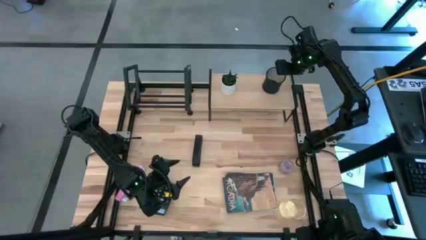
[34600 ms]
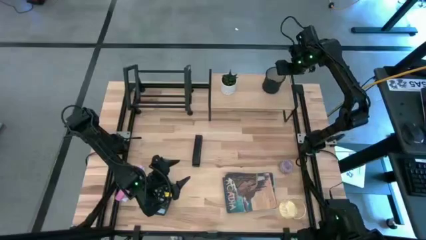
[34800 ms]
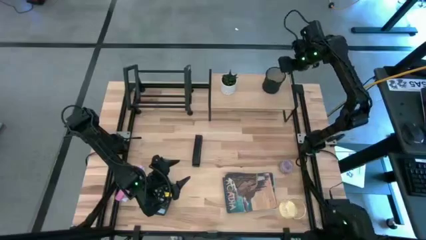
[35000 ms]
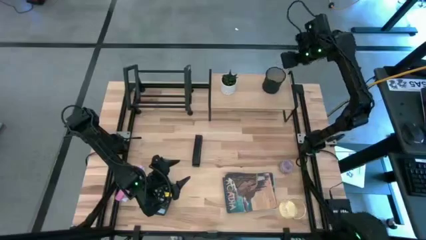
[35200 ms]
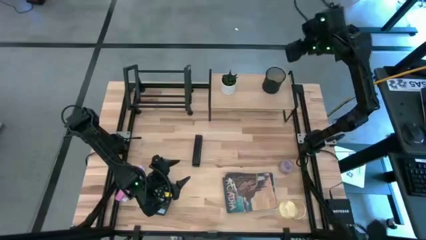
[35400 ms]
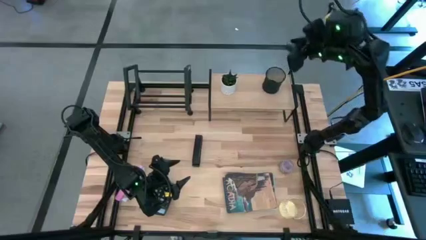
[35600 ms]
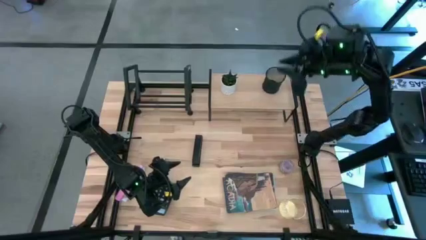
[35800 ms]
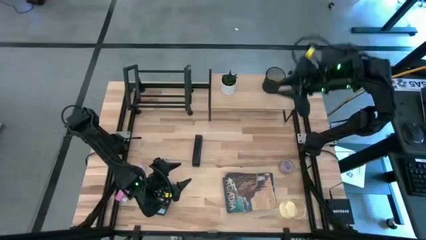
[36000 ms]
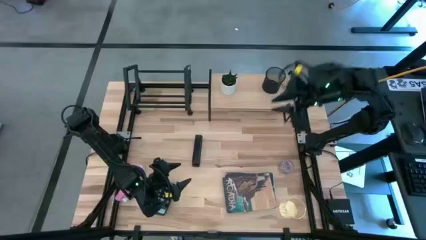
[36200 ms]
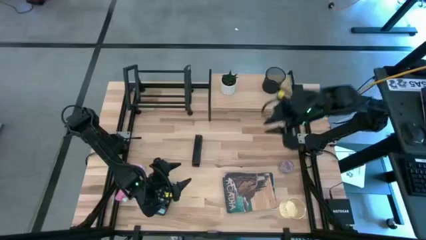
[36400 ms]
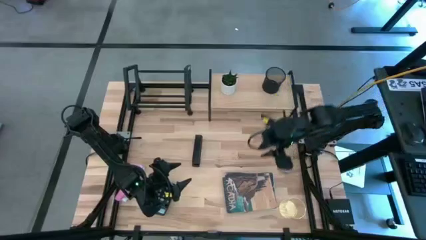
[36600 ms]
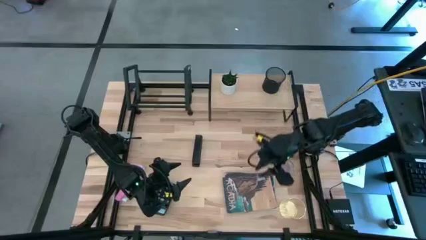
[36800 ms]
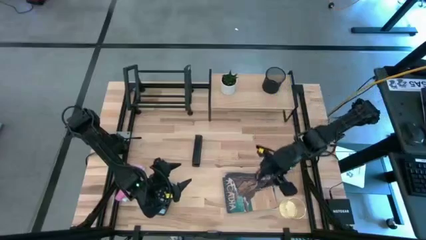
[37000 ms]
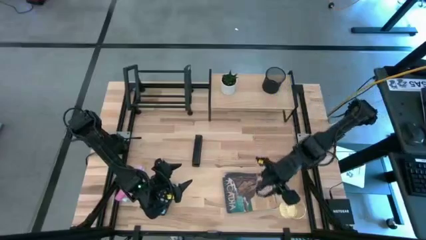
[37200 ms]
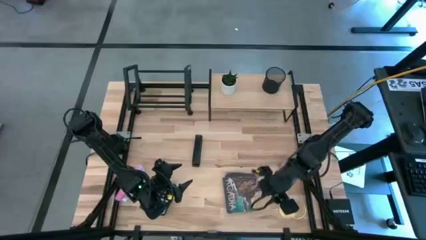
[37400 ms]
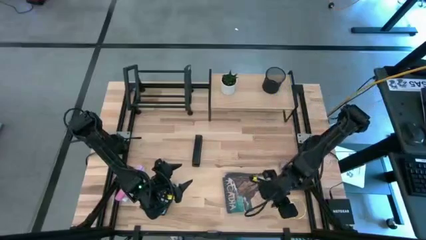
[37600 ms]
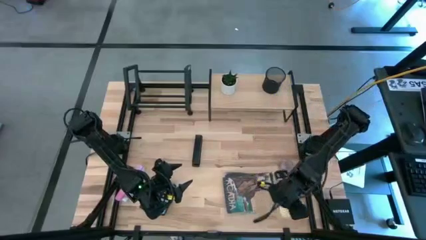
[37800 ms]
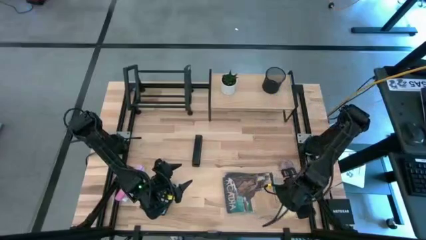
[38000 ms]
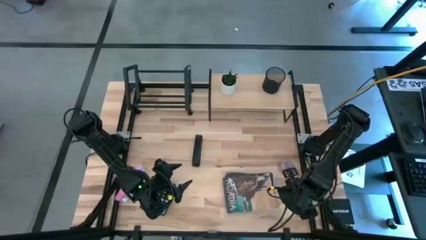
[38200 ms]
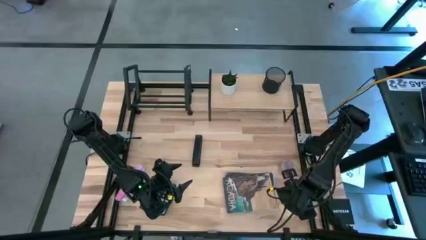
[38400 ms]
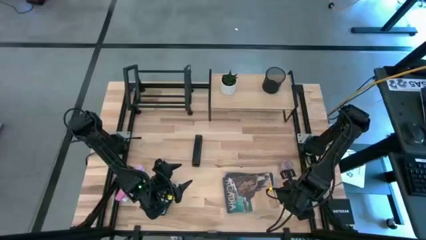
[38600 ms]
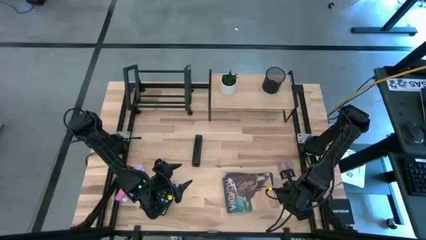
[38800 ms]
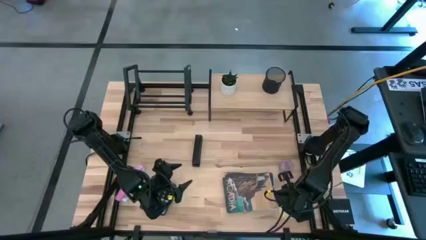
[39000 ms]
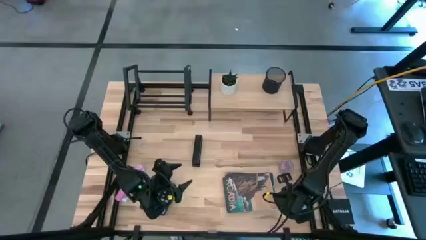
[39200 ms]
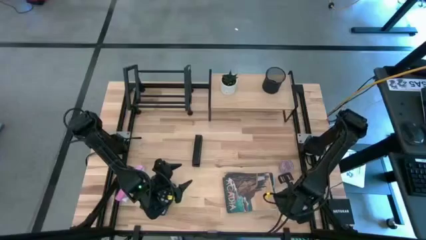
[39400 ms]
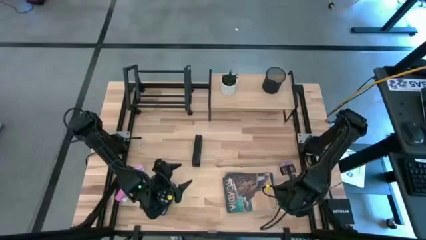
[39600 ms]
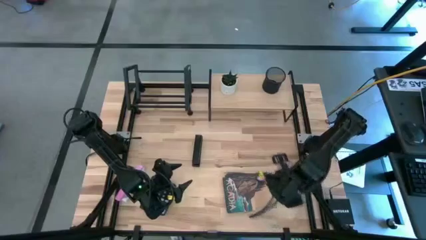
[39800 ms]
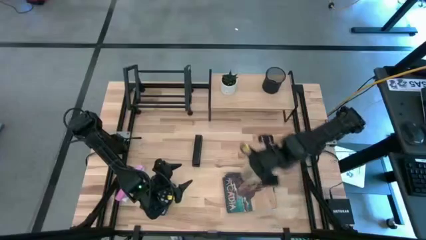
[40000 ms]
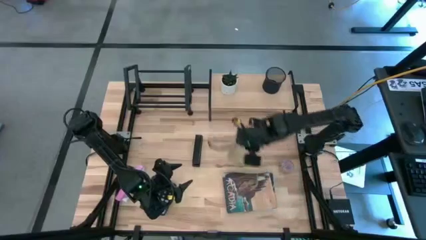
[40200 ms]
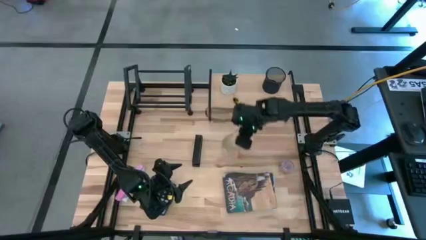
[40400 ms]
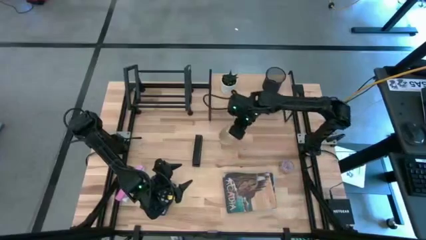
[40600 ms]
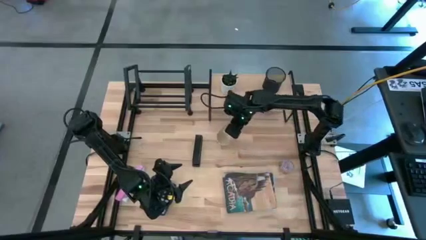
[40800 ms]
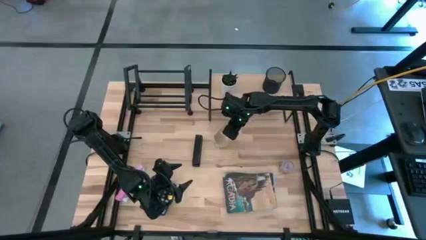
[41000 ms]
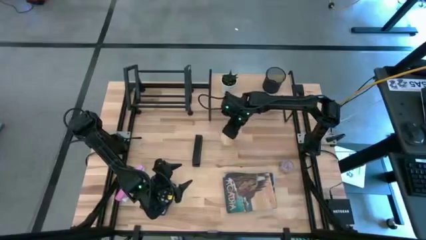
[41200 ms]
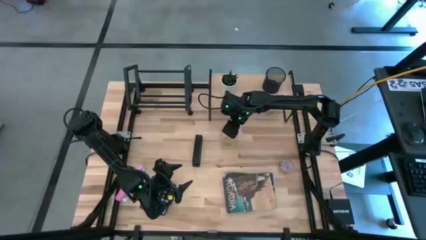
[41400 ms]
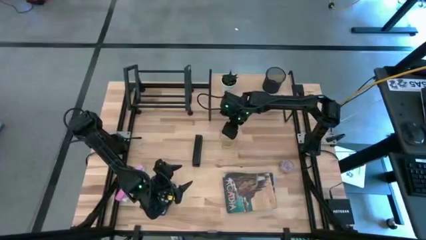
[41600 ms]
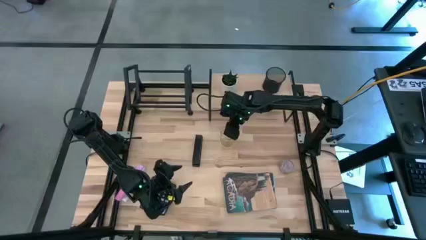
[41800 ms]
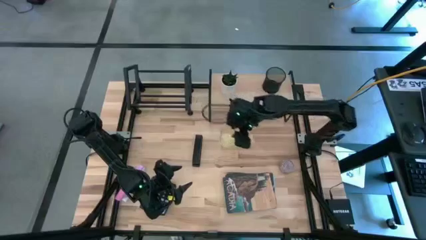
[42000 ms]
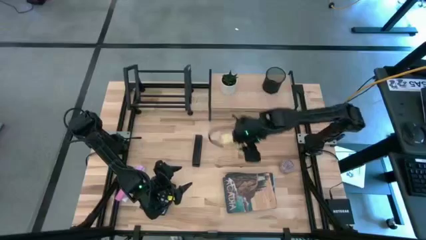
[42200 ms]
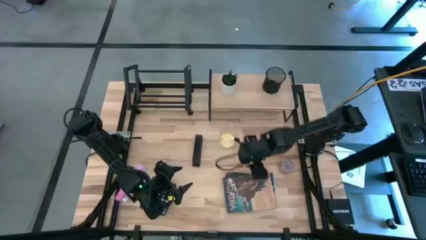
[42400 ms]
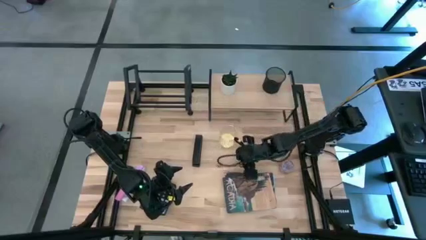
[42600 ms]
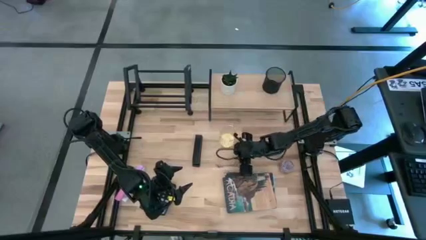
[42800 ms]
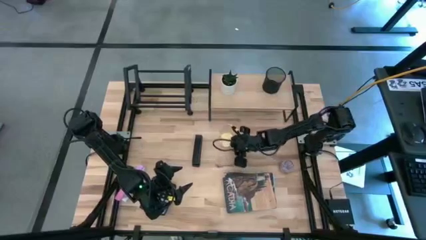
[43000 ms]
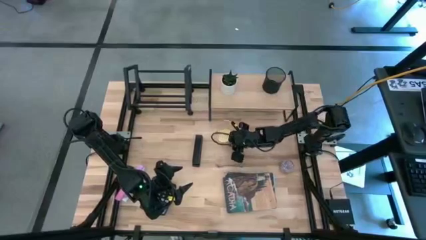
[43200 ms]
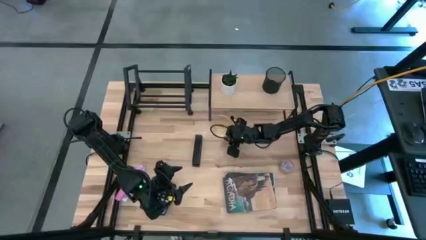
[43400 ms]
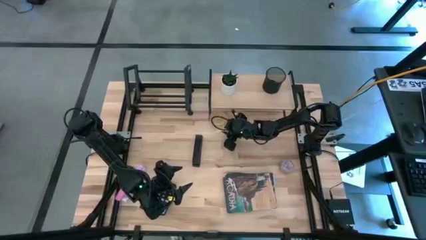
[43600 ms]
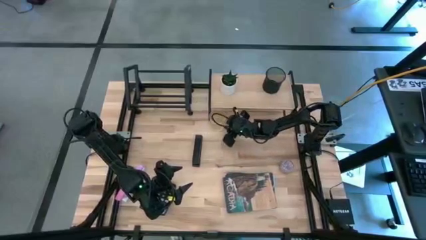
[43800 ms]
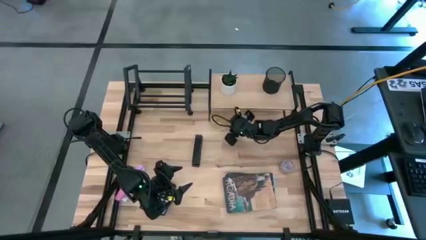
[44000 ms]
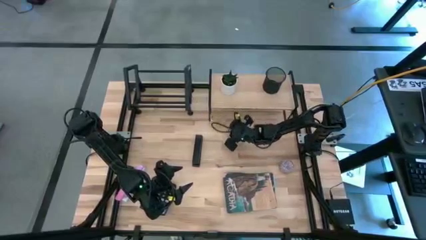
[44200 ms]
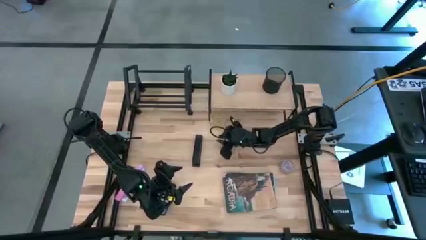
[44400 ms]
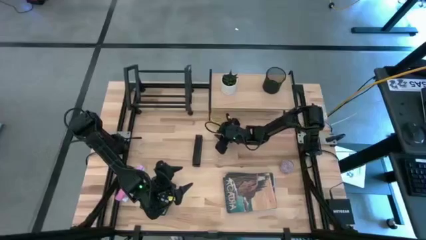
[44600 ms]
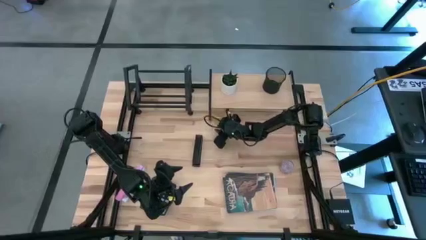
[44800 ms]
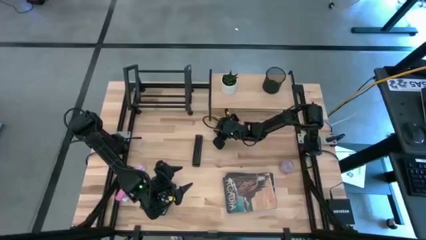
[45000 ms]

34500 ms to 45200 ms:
Task: Stock shelves
Put the gold pen holder under the shelf

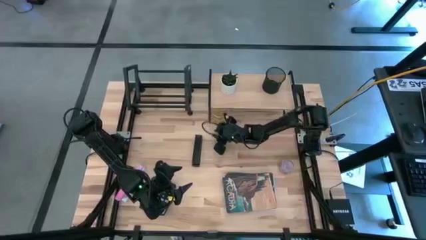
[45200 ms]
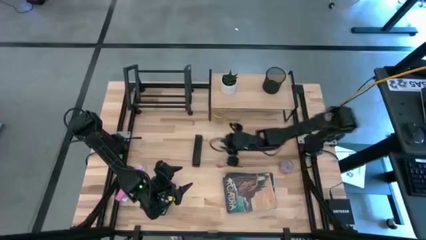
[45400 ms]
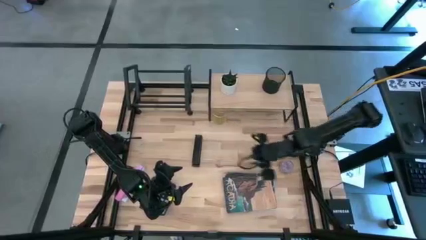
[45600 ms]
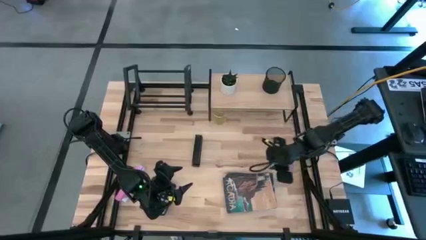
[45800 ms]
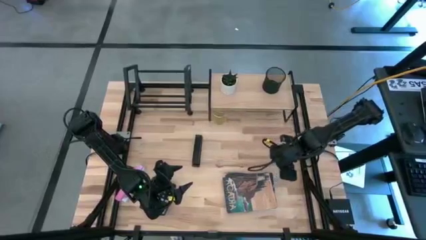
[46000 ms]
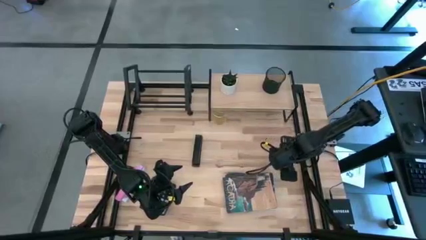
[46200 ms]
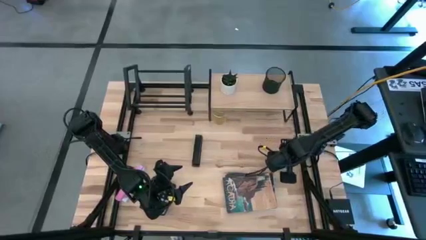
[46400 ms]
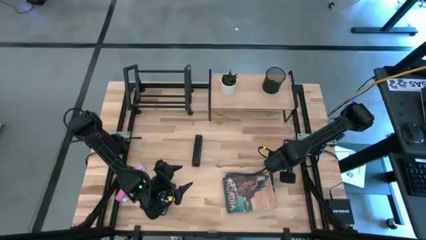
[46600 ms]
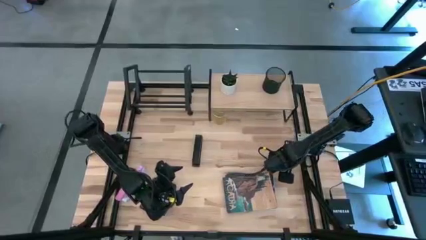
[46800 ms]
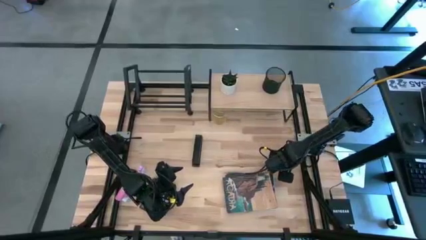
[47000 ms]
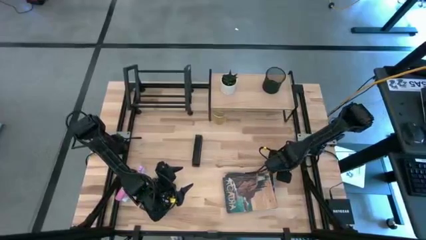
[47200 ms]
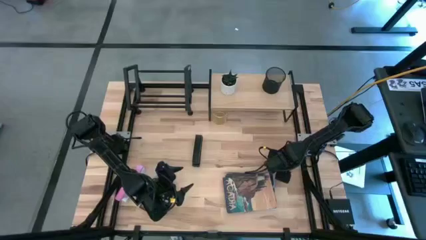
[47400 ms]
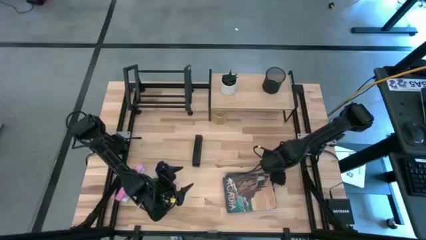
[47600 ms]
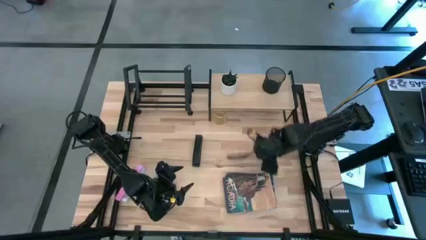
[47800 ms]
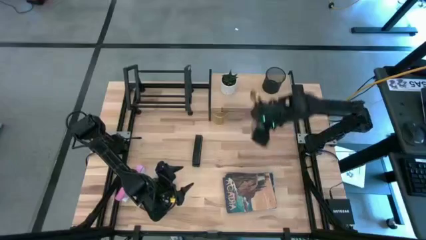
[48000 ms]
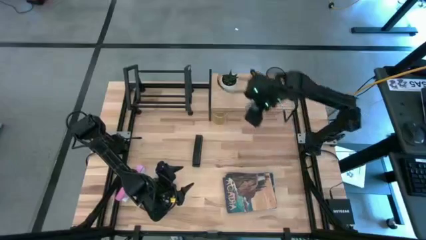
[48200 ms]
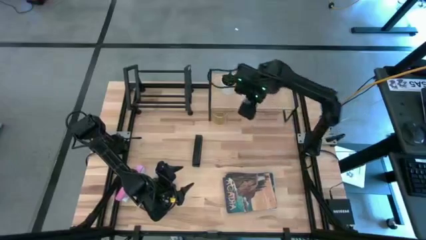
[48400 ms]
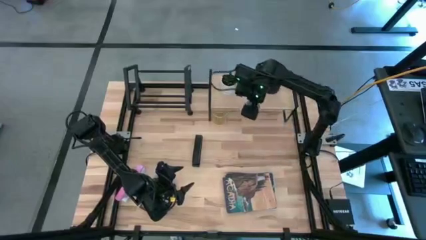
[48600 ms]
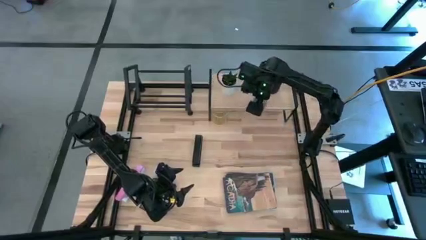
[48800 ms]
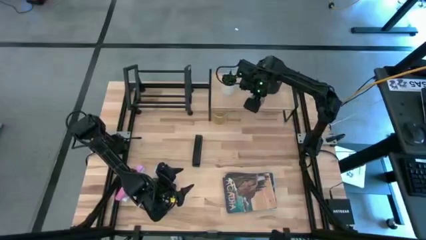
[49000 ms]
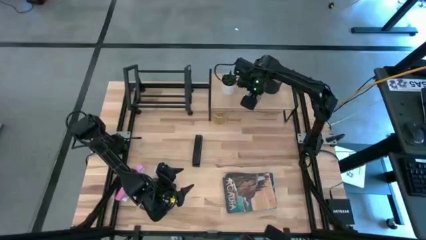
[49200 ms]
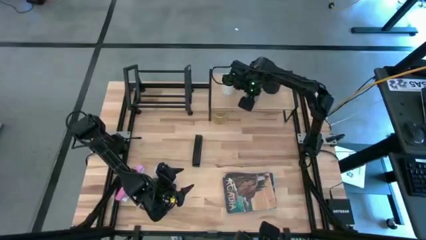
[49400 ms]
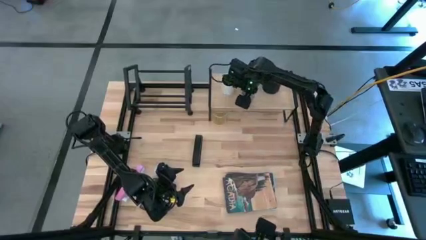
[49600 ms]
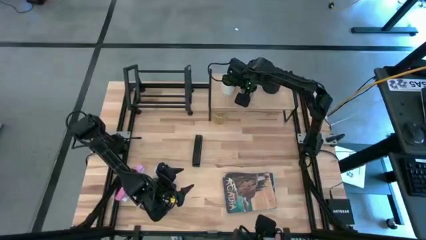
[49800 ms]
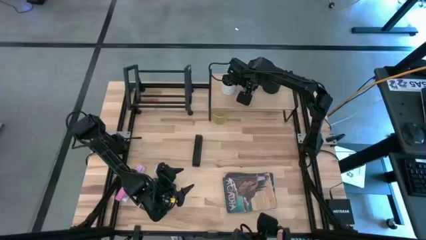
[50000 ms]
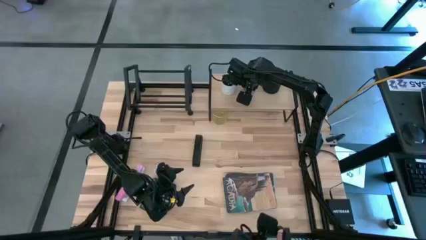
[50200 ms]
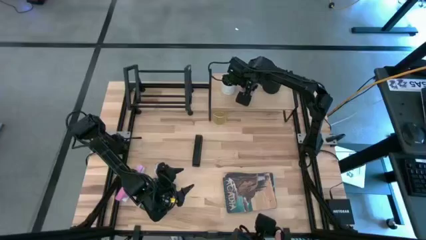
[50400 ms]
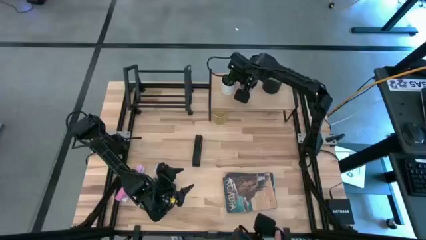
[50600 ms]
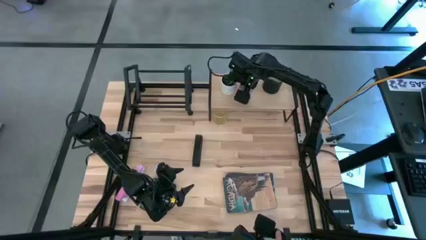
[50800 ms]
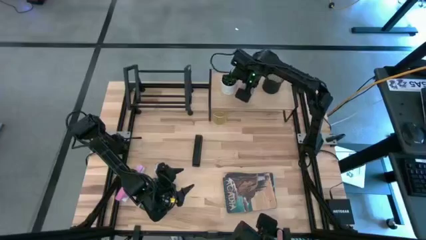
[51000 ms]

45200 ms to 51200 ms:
Put the red floral-patterned item onto the shelf
